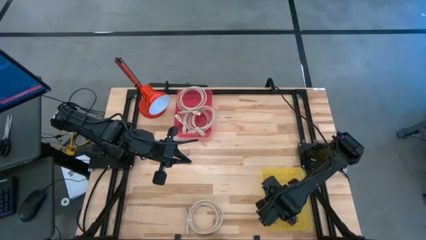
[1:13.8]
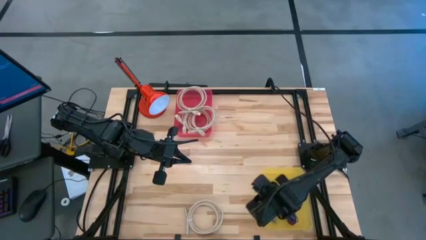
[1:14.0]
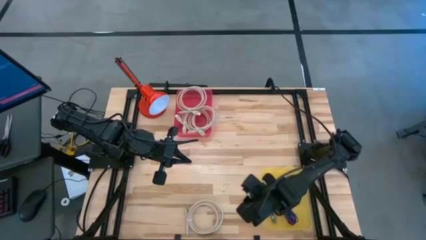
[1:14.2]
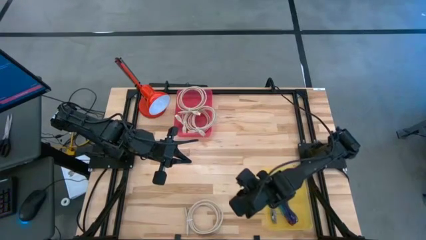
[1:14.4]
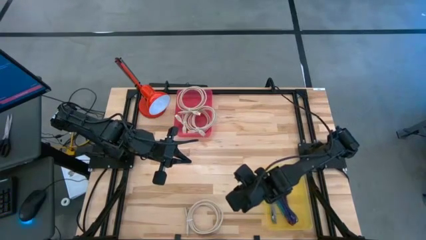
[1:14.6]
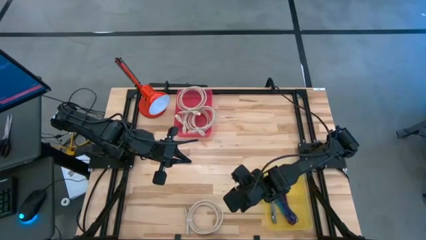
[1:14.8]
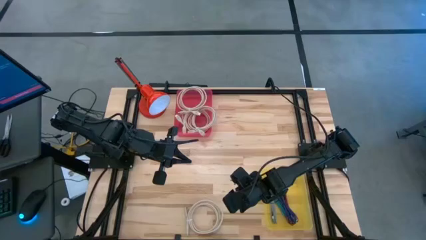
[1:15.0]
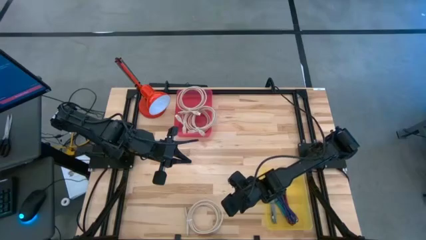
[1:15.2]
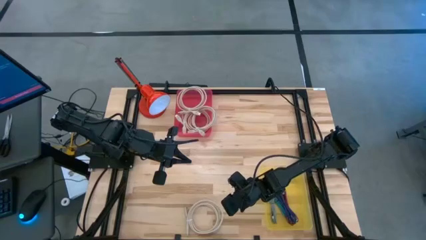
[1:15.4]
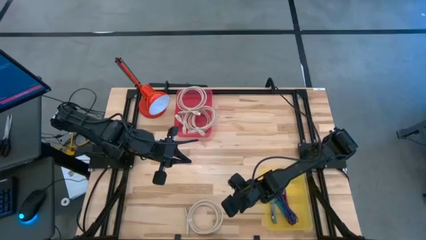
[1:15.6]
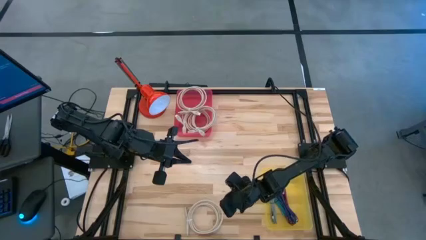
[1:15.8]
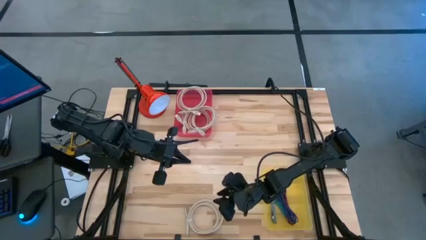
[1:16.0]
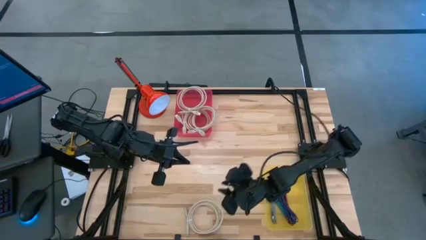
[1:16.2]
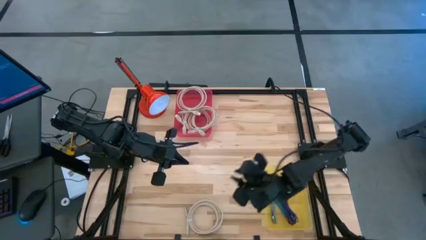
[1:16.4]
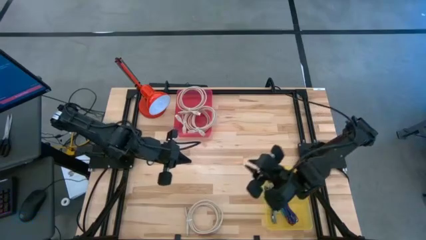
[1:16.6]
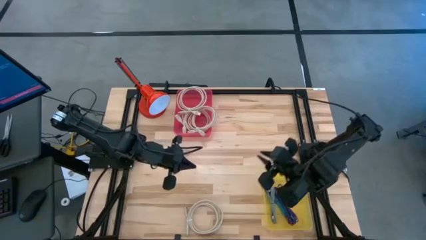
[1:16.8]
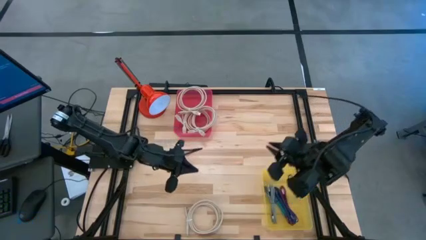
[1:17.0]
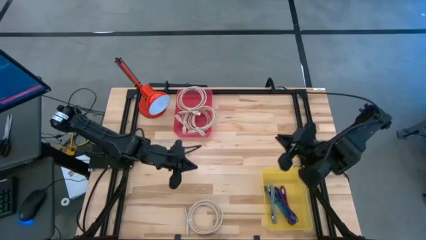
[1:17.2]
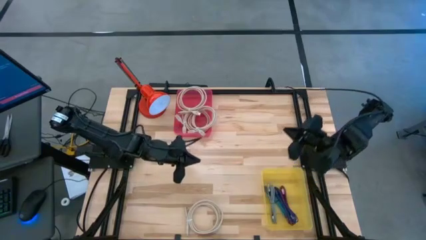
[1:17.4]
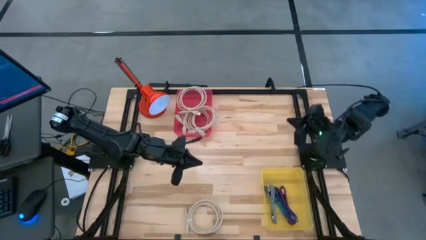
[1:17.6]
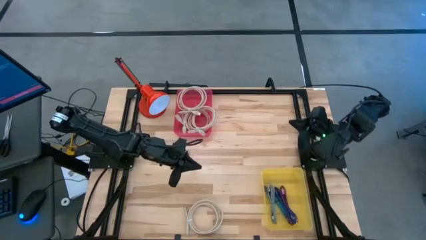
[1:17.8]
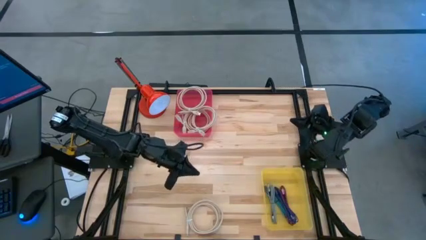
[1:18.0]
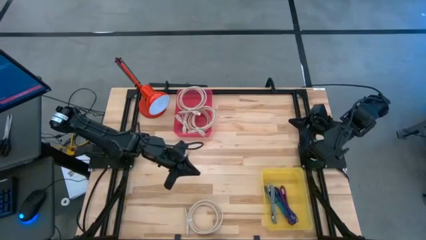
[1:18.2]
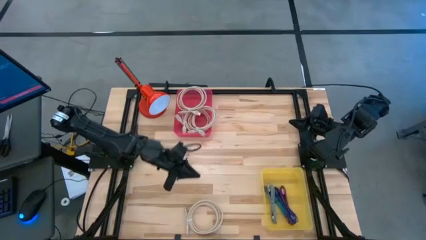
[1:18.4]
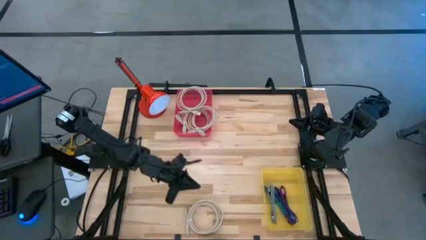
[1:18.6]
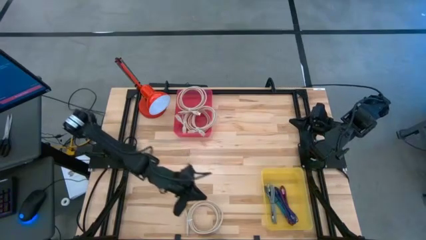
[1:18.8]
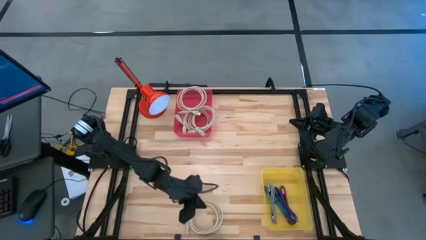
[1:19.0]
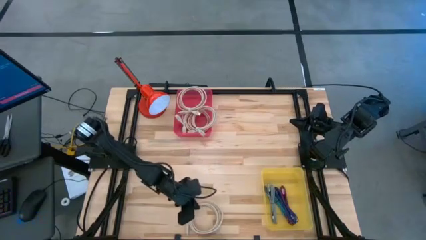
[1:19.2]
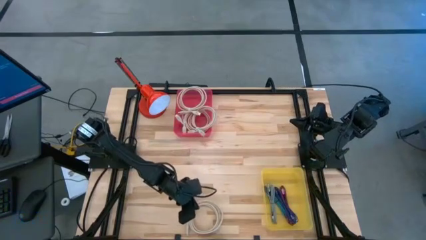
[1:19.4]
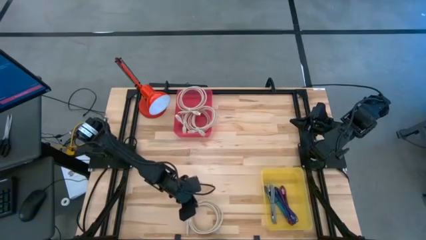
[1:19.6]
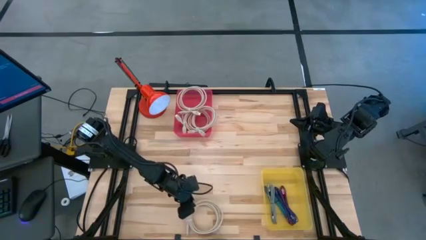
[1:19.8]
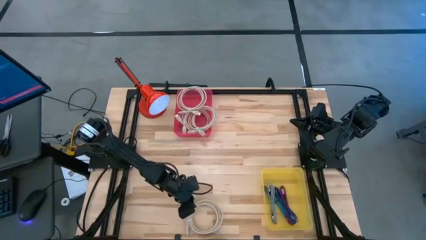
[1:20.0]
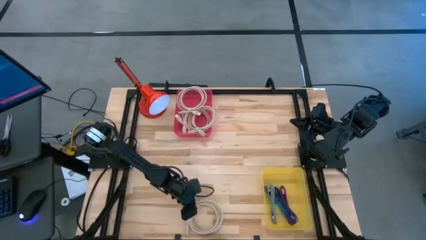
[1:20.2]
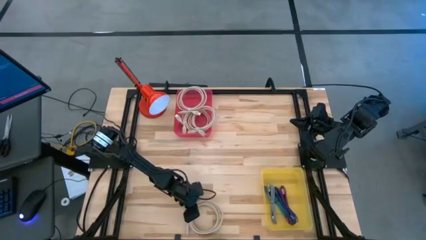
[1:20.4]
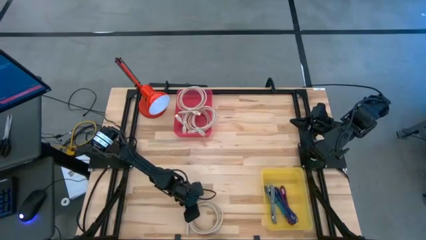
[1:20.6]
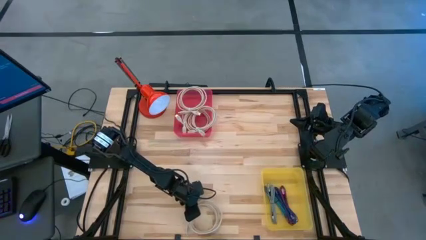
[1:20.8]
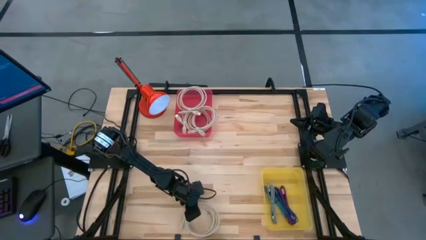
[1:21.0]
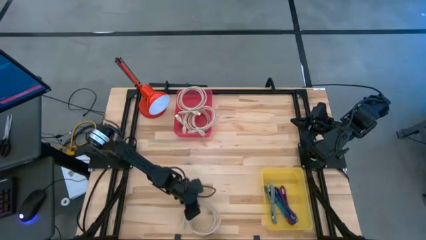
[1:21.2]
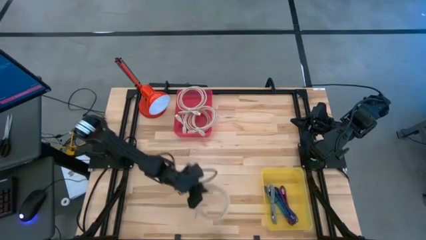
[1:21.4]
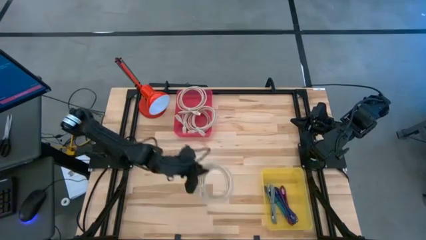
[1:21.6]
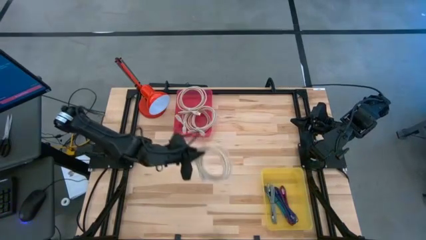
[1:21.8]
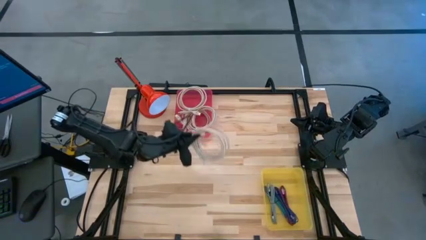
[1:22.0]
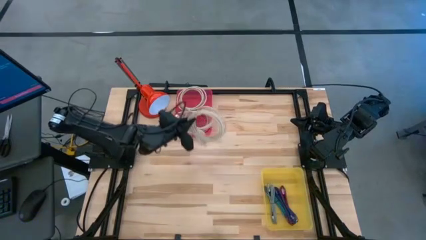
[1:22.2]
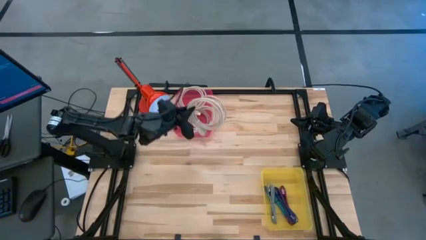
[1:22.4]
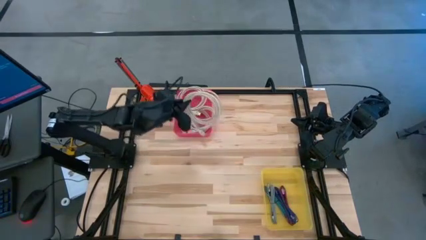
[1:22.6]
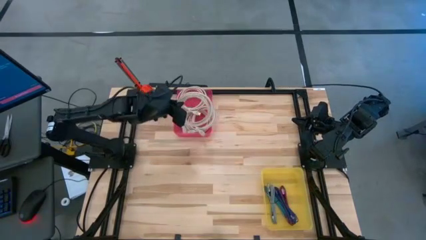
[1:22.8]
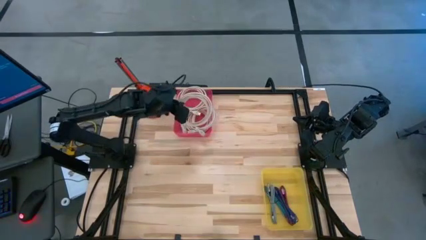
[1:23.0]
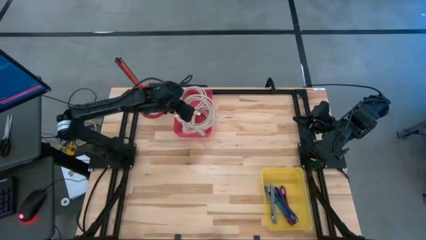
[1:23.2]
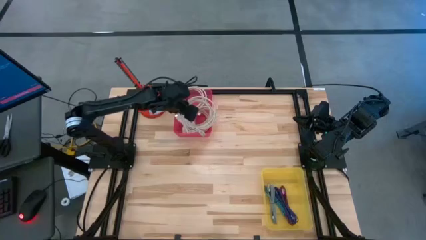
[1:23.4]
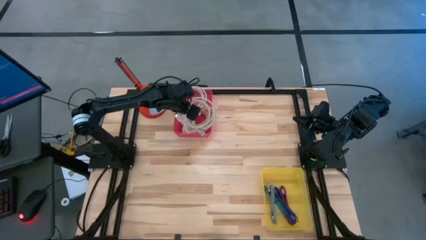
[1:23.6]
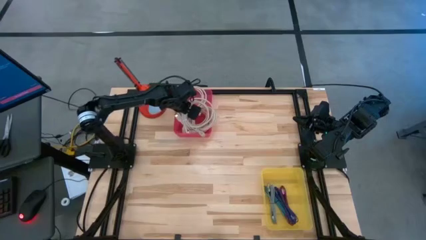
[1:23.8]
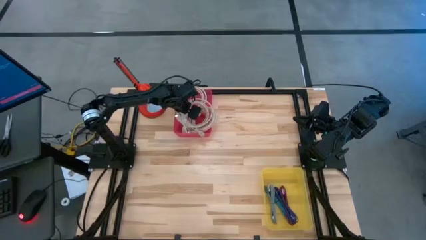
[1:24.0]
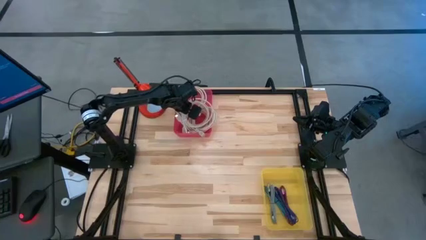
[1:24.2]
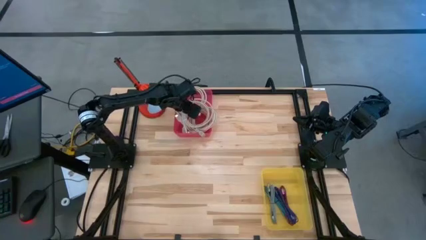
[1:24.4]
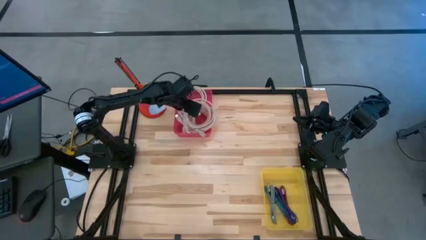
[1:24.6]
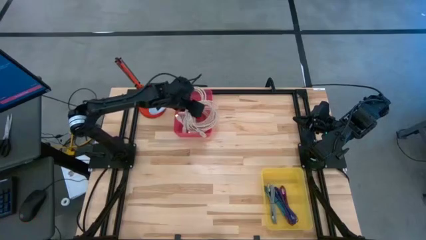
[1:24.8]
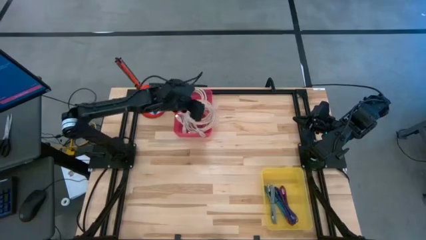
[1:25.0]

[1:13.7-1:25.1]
Task: Pick & Place USB Port
Put the HDMI cable into the red bin

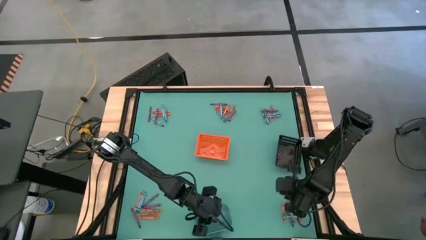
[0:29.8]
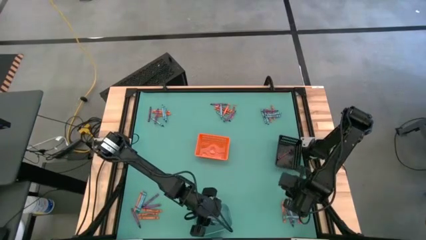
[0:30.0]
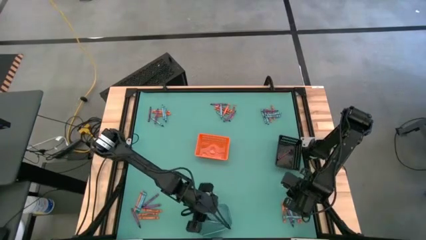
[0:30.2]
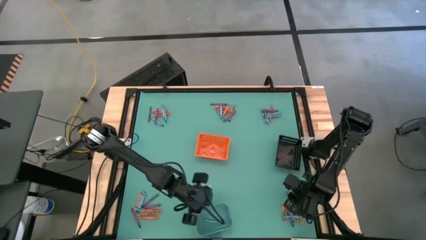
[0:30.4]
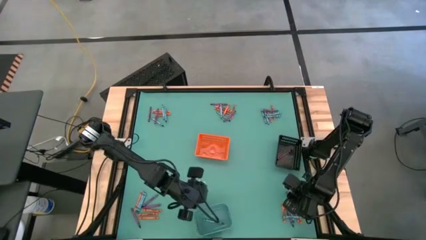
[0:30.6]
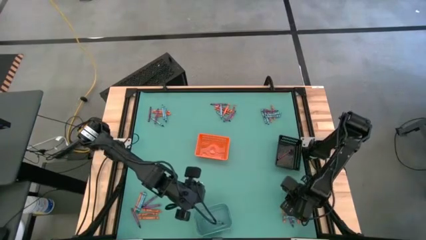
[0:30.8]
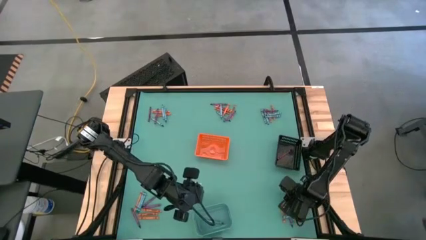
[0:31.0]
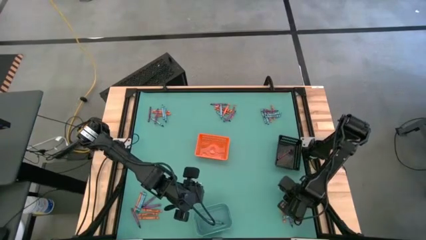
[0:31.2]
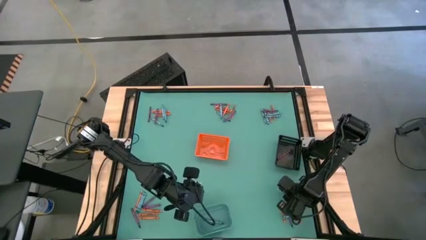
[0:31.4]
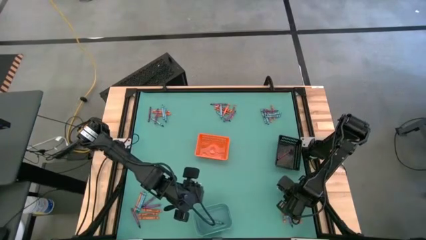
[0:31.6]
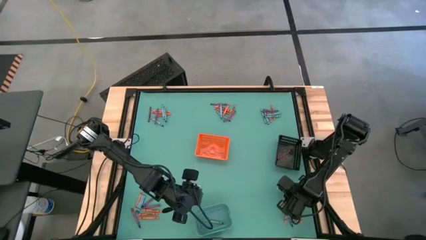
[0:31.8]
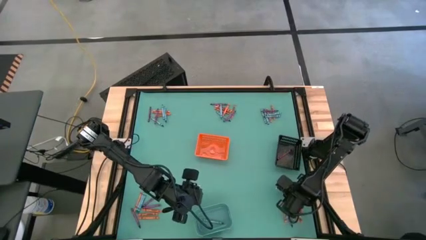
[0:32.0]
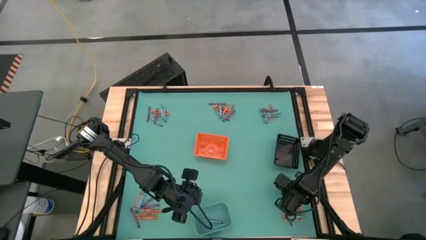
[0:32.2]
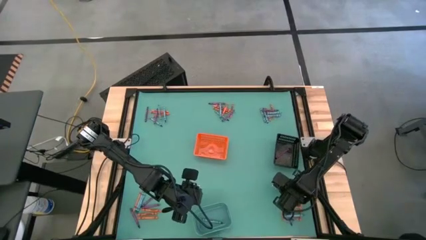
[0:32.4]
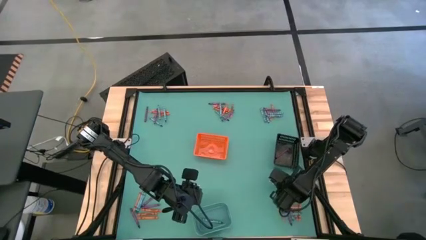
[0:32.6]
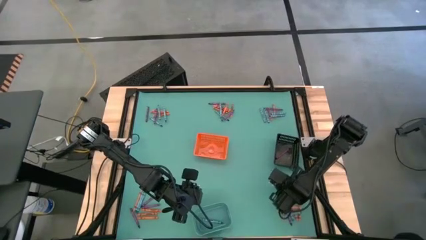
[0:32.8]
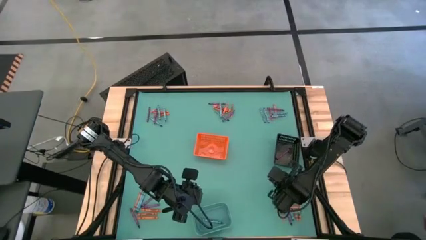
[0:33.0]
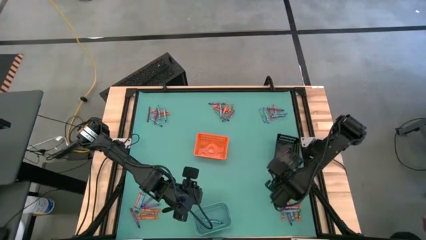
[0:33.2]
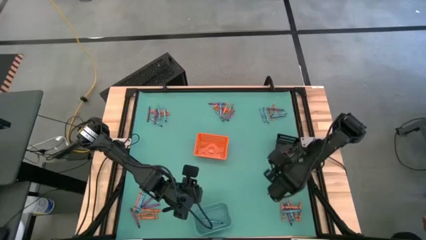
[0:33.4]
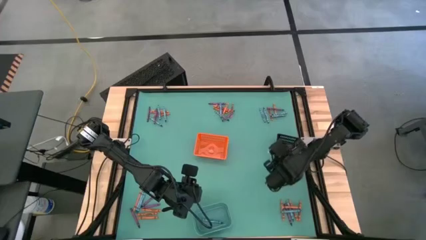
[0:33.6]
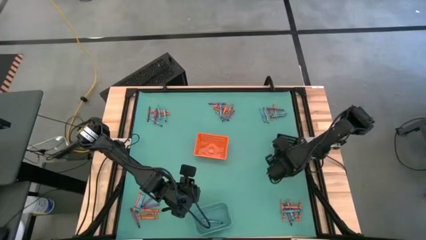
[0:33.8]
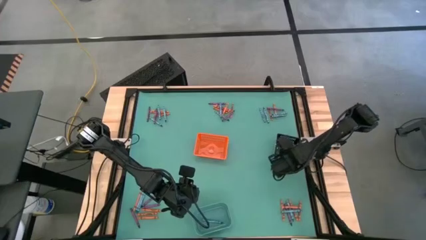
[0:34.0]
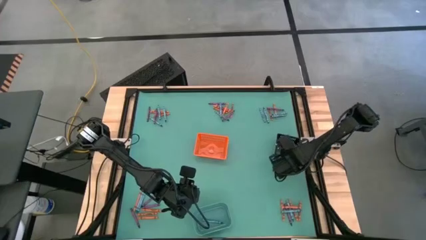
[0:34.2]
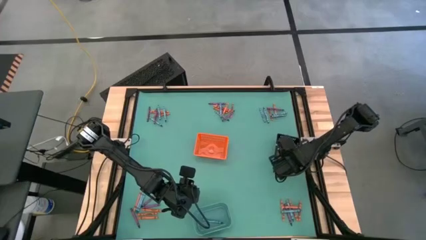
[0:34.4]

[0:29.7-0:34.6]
Task: Sort crayons
Put the purple crayon into the black bin
